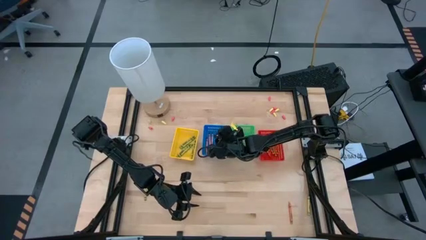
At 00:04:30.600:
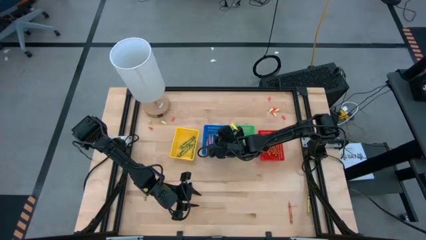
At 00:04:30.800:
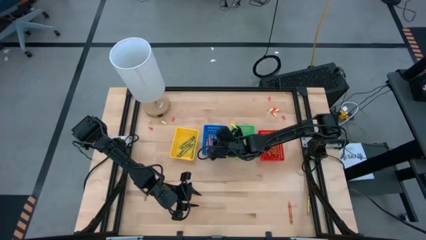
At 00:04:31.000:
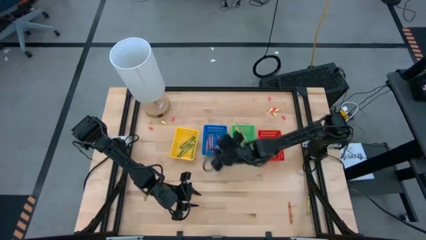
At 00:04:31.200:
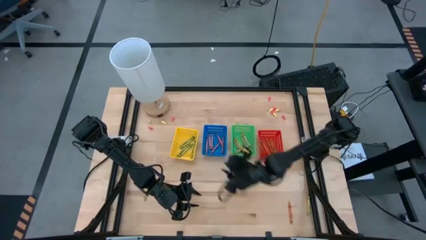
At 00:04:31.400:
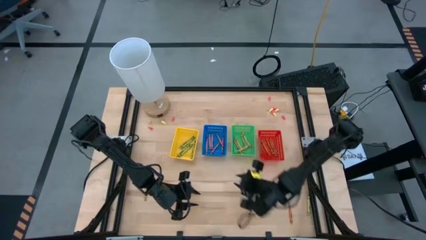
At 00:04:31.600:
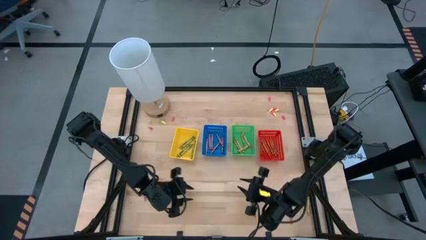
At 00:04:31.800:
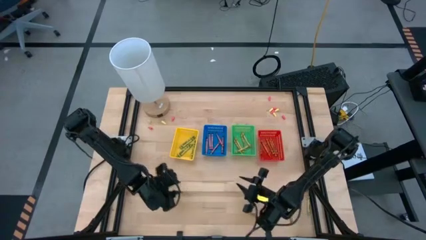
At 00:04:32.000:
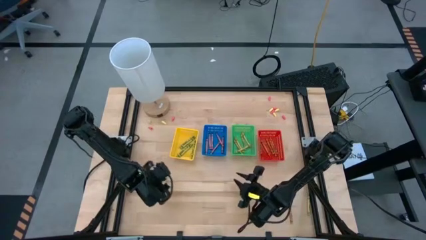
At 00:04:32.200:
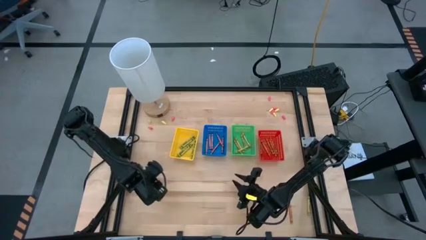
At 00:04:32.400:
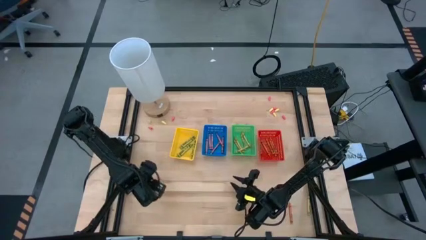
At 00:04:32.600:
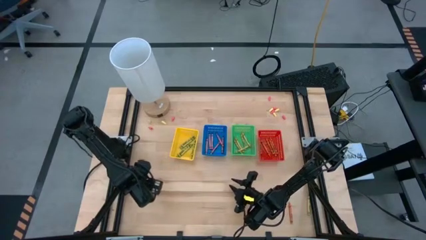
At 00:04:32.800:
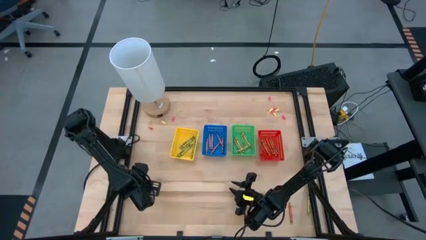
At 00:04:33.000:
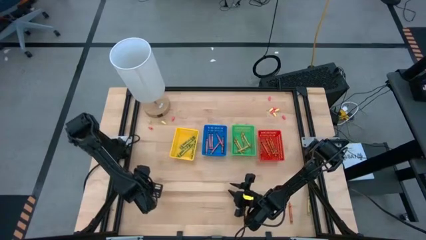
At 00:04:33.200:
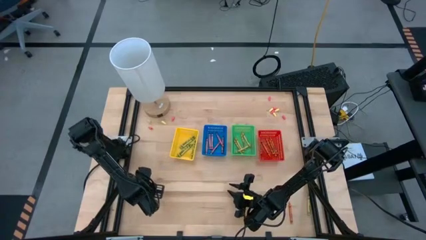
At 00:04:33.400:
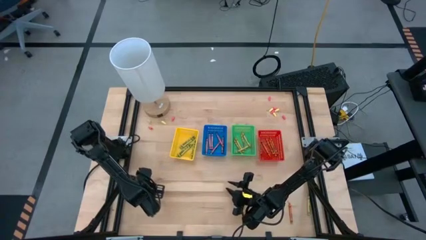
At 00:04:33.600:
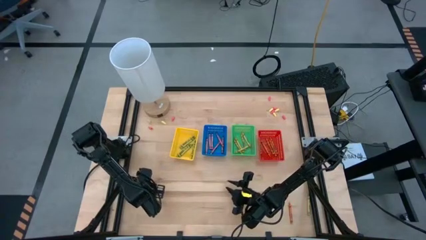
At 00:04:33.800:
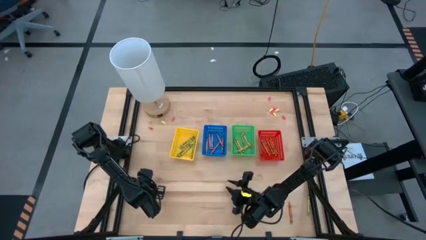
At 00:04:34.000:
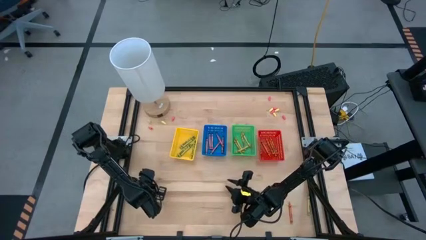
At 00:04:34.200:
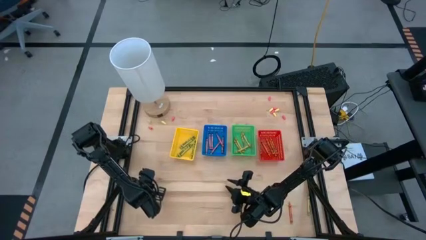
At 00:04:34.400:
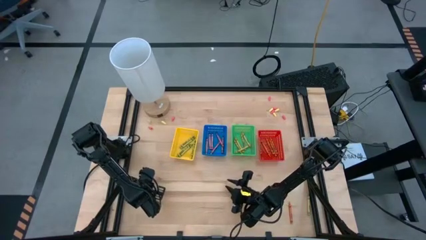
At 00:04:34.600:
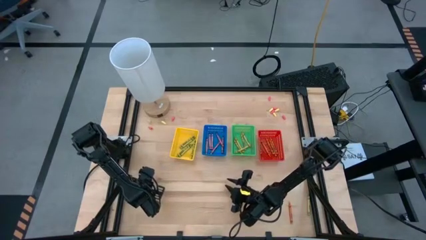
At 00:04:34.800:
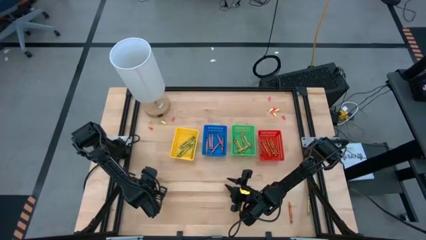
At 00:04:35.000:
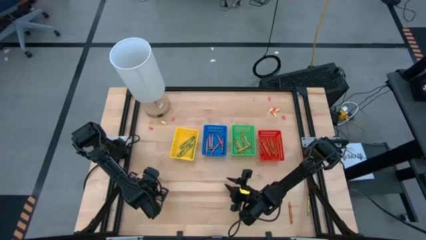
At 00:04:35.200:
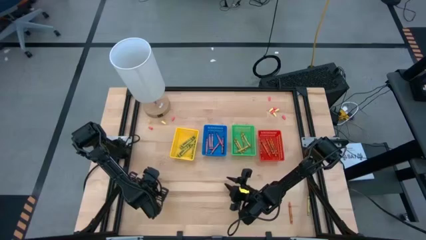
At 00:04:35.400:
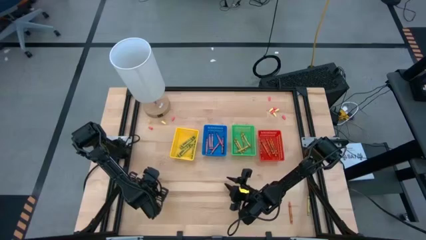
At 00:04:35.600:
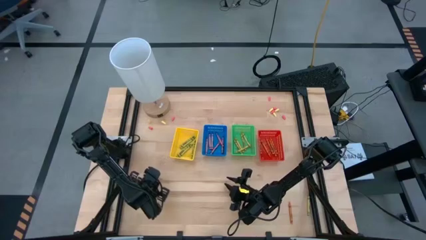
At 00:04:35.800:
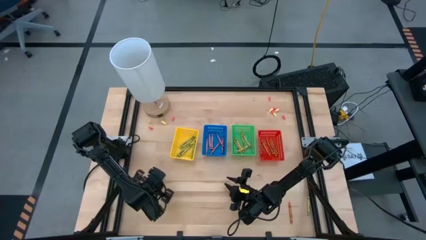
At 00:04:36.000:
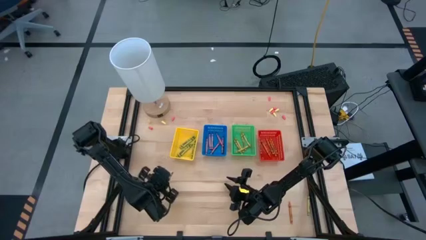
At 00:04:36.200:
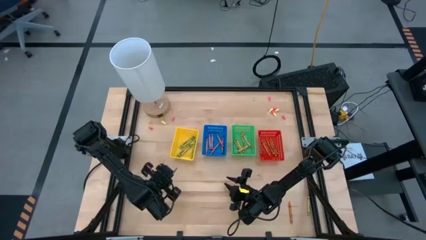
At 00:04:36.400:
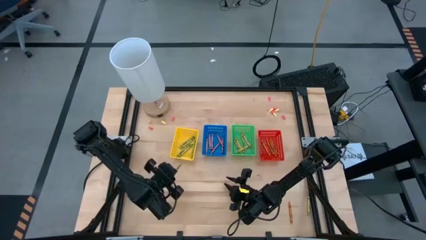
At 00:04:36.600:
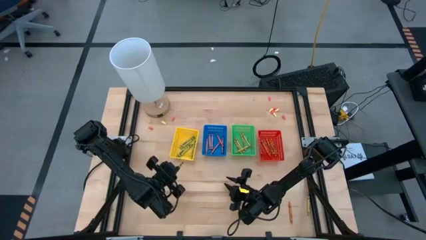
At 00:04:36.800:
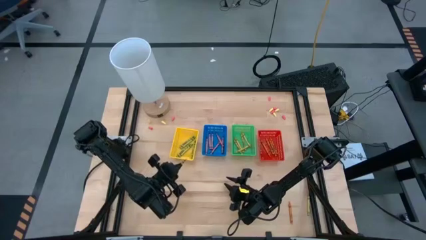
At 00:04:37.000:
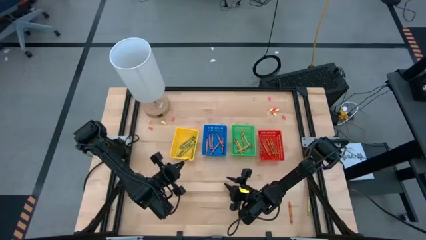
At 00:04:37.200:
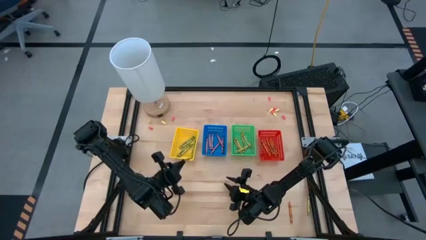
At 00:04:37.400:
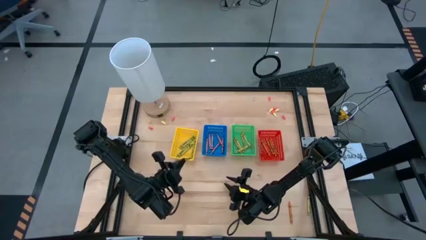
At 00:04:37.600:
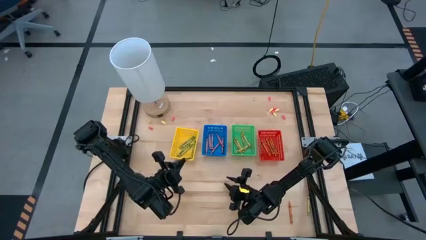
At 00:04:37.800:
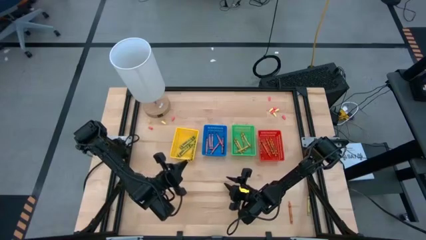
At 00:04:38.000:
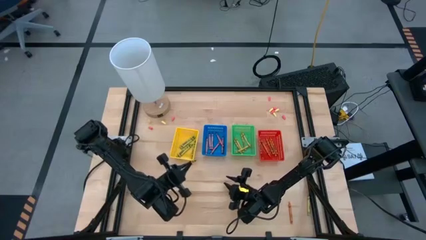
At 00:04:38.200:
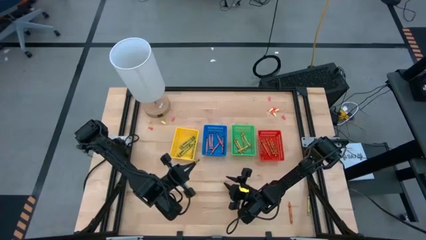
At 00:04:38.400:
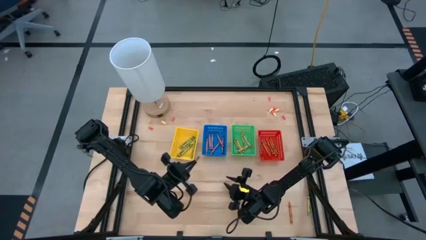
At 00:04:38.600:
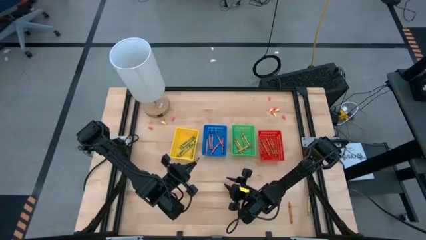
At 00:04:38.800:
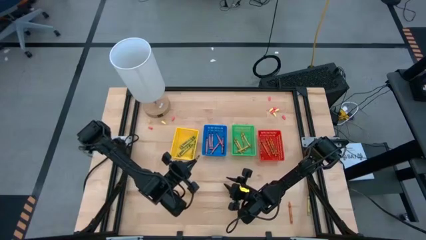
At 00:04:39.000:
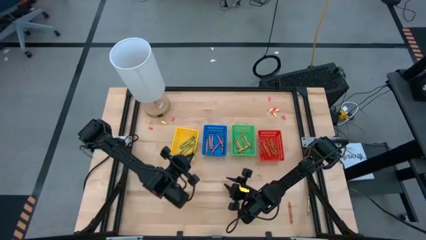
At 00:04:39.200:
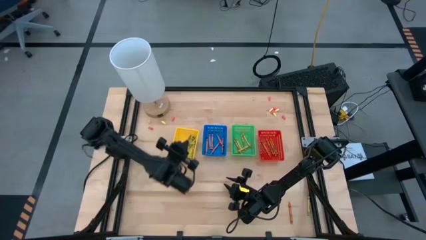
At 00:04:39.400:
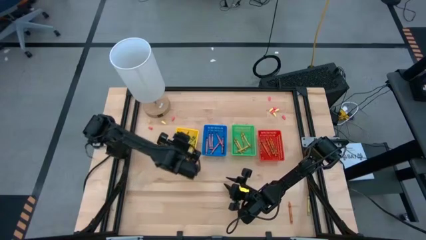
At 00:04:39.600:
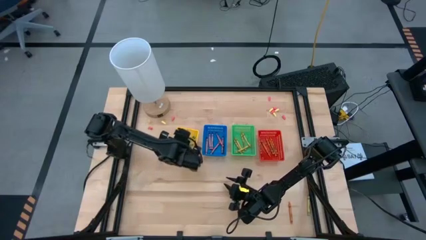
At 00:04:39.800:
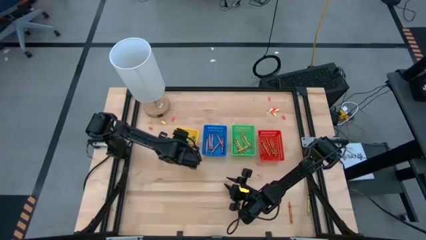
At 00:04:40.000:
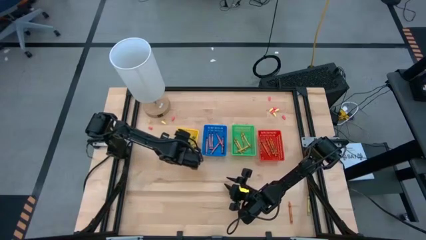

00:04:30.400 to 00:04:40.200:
Task: Sort crayons
Put the green crayon into the yellow bin

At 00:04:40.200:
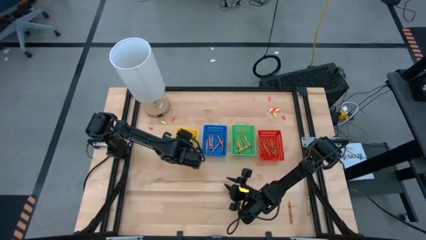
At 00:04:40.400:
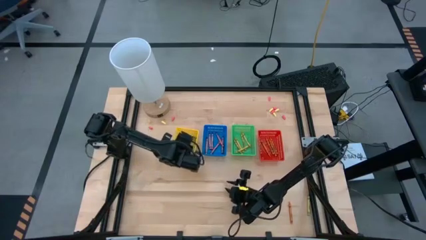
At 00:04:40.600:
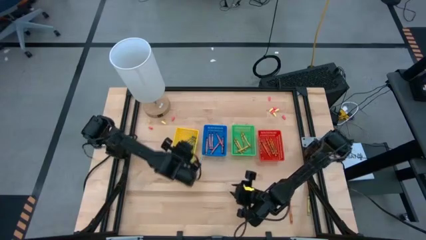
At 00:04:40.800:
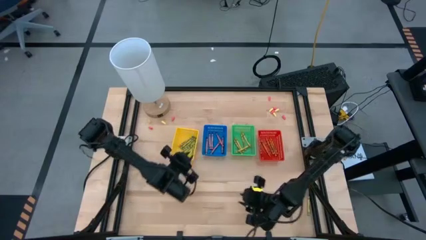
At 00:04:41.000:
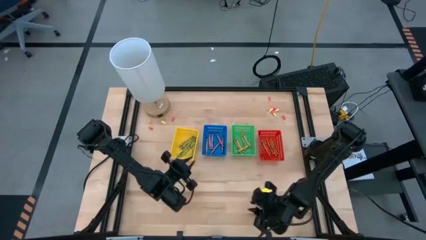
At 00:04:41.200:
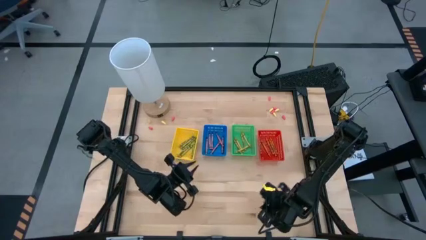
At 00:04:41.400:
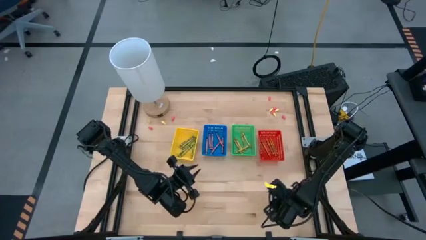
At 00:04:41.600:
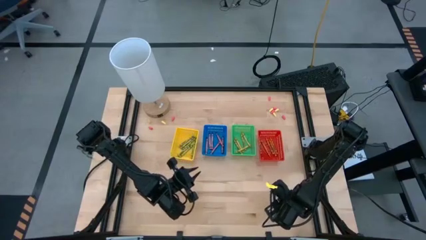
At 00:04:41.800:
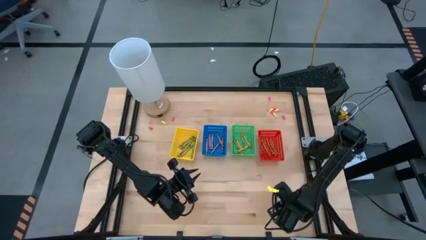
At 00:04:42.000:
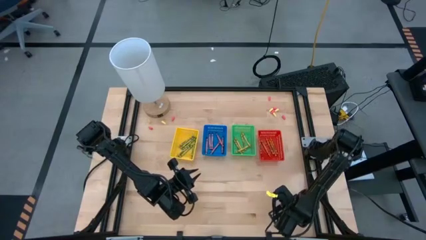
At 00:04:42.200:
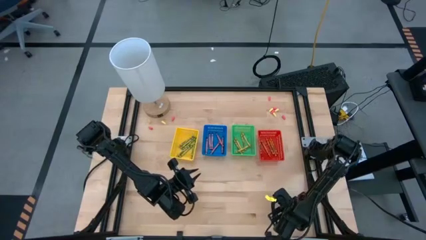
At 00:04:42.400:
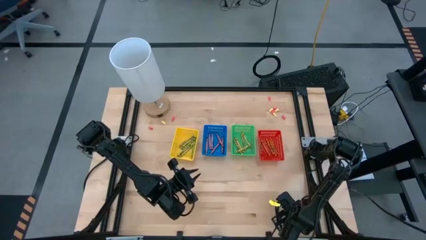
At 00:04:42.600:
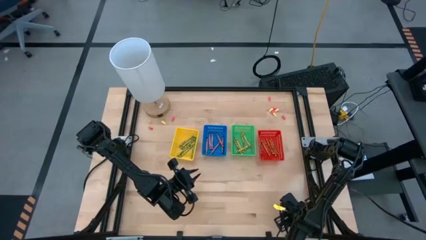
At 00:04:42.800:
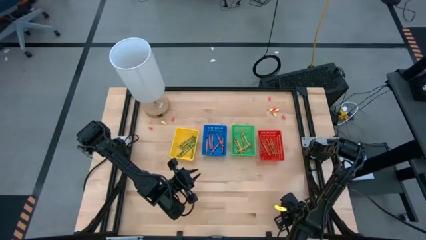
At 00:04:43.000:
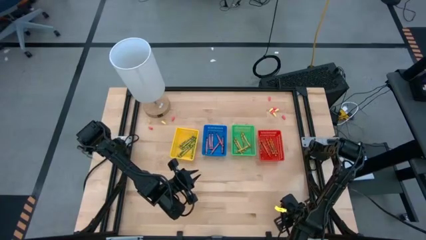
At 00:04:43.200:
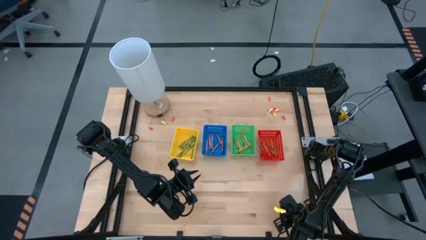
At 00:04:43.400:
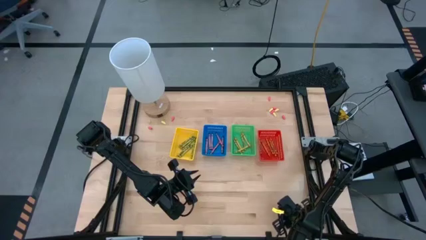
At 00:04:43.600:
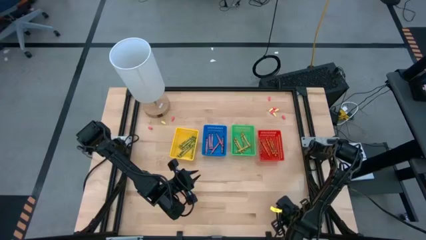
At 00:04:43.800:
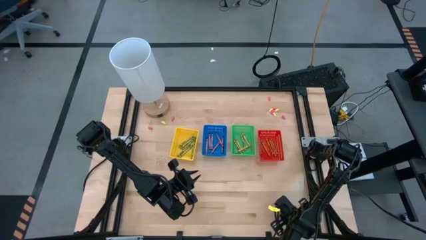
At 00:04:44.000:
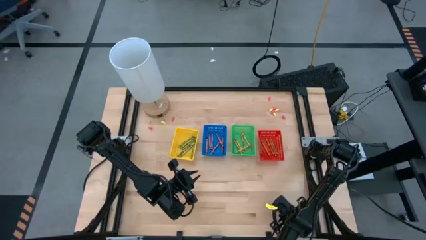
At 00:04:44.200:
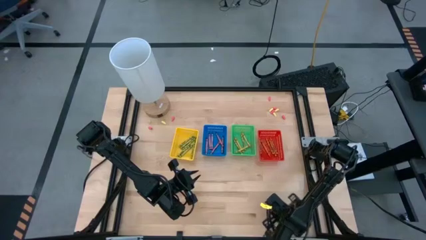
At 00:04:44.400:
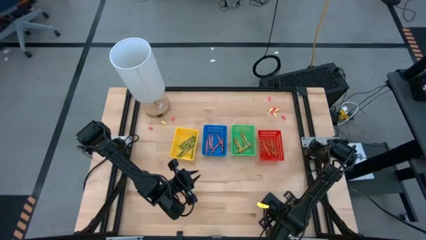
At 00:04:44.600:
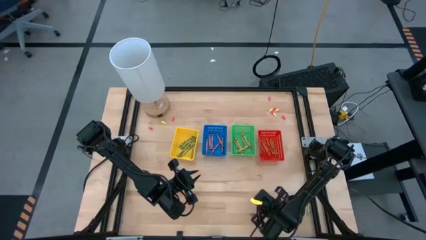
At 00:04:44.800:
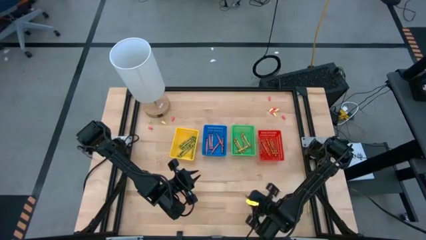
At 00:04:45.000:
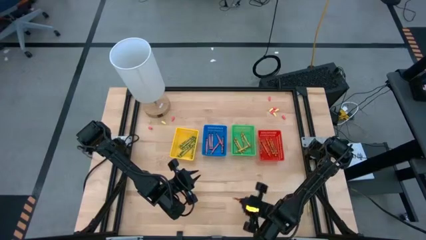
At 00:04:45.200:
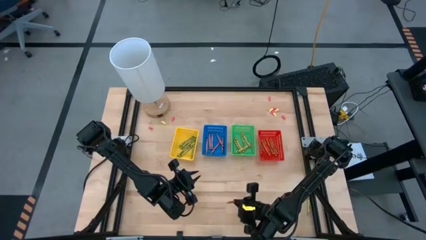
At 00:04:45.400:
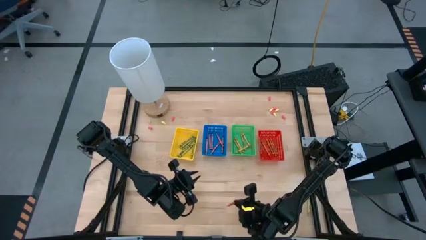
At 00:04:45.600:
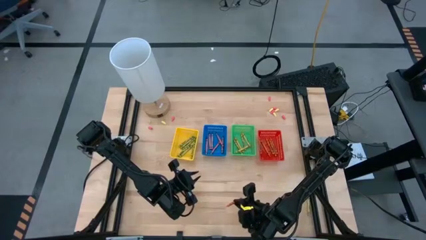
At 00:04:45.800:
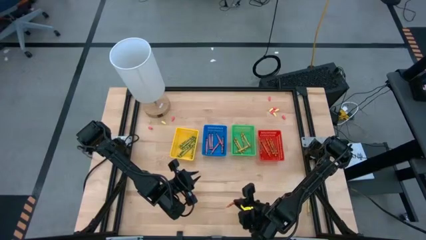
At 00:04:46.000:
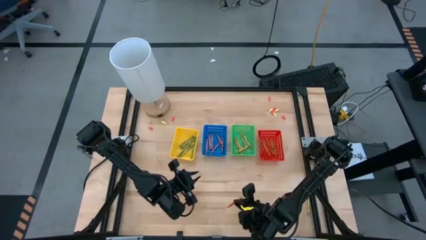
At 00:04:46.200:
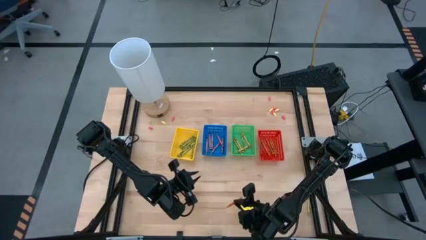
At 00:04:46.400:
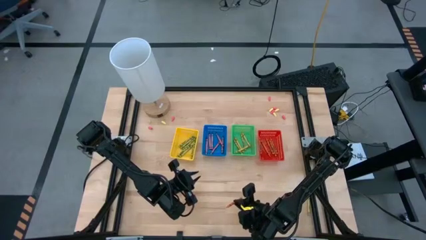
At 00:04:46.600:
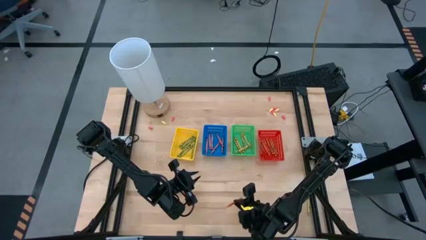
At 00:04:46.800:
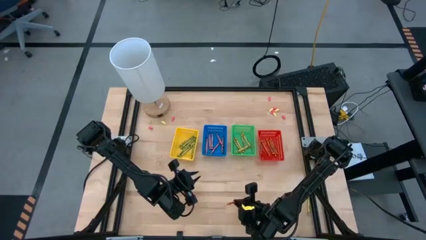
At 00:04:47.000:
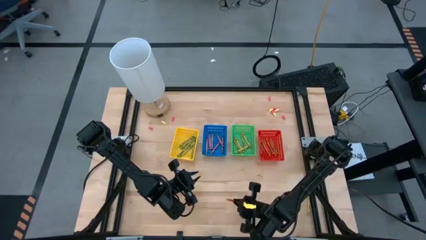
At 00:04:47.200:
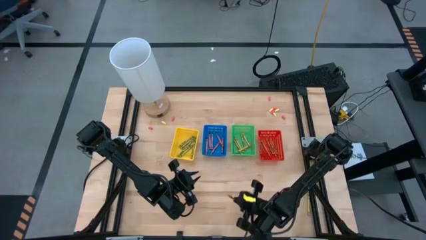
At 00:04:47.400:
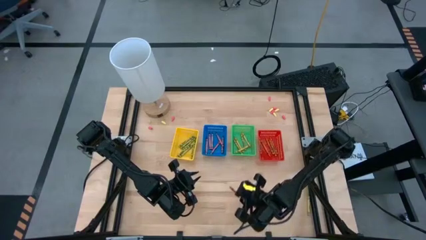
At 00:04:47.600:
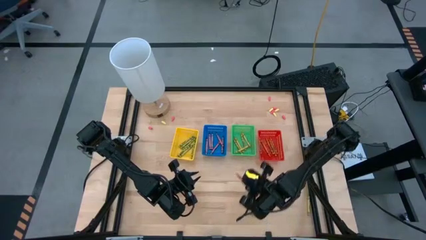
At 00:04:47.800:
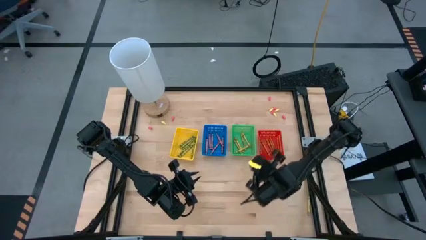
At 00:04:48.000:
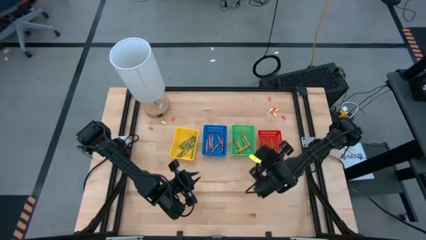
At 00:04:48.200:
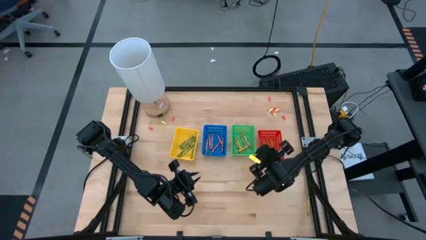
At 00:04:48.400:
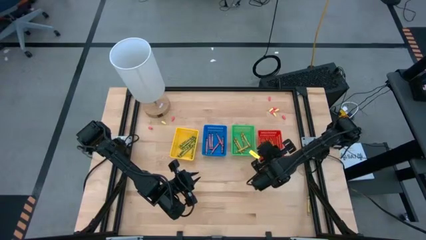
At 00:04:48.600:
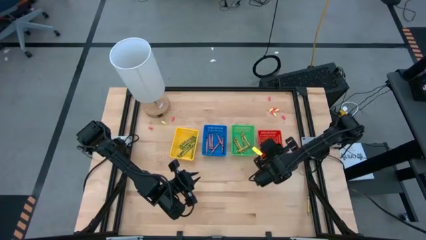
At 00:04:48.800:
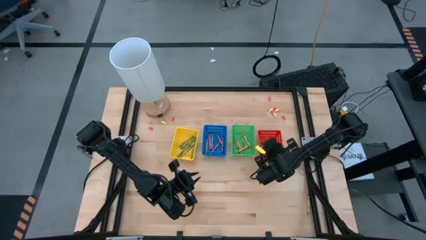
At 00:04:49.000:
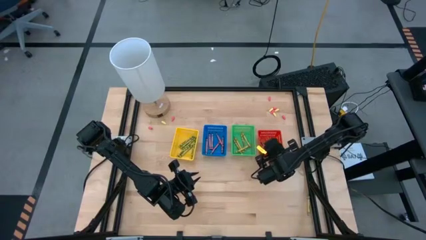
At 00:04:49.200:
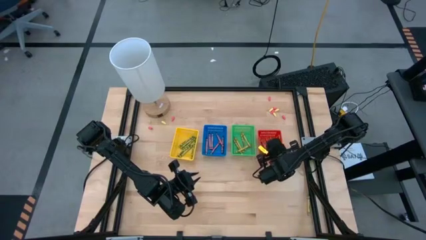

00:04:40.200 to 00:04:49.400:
Put the orange crayon into the red bin
